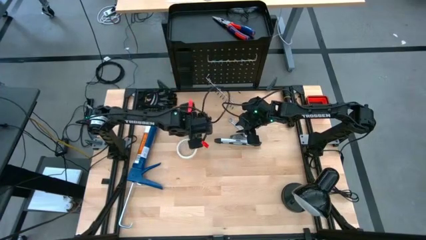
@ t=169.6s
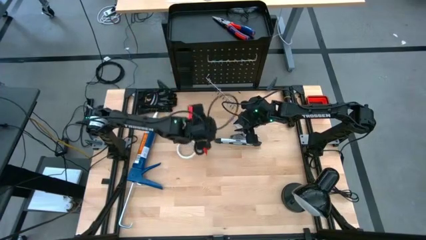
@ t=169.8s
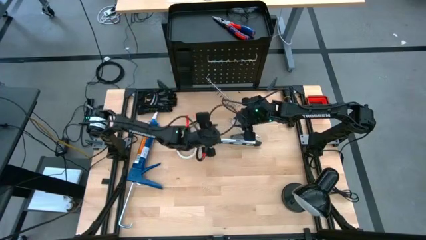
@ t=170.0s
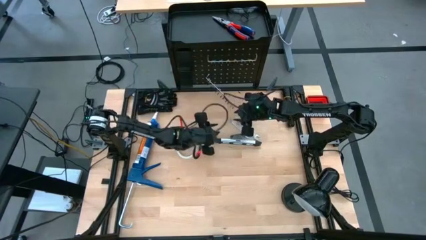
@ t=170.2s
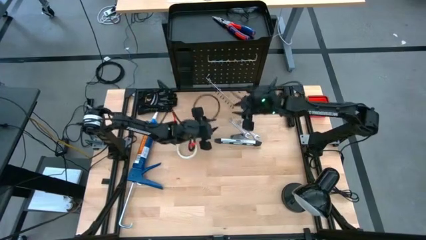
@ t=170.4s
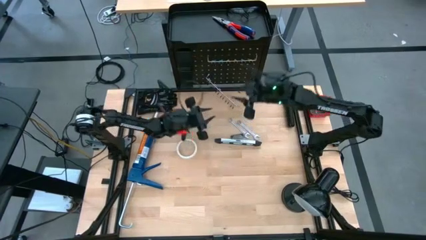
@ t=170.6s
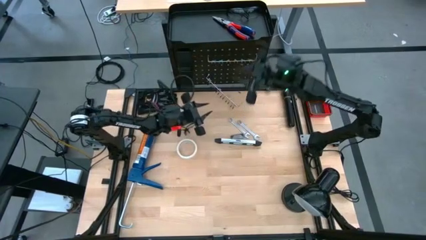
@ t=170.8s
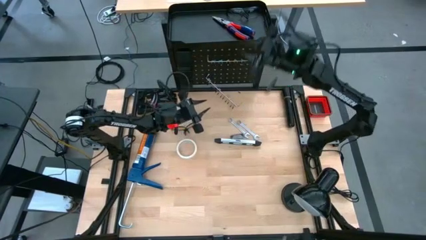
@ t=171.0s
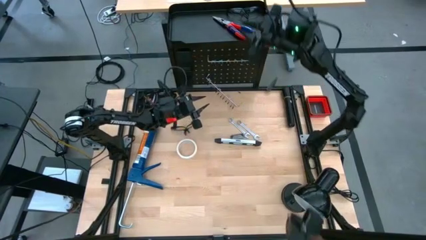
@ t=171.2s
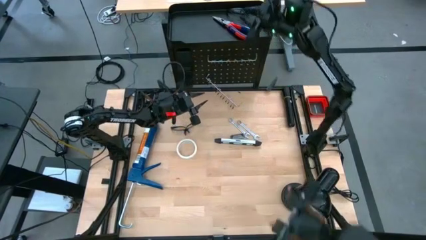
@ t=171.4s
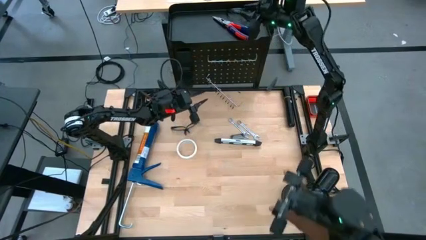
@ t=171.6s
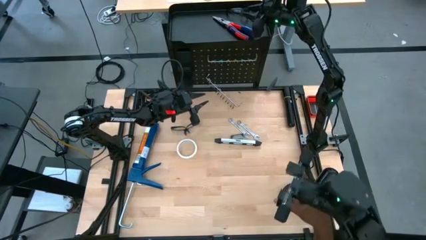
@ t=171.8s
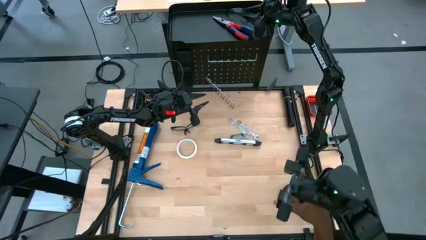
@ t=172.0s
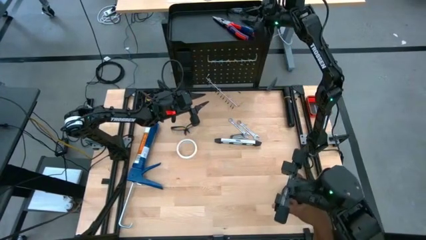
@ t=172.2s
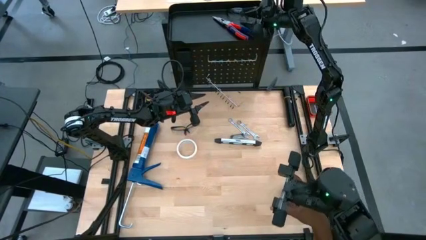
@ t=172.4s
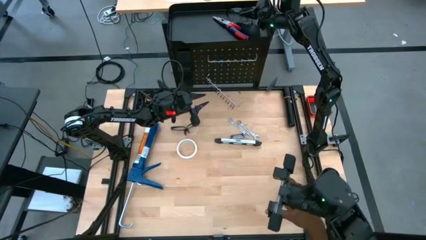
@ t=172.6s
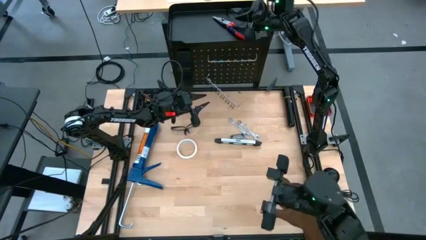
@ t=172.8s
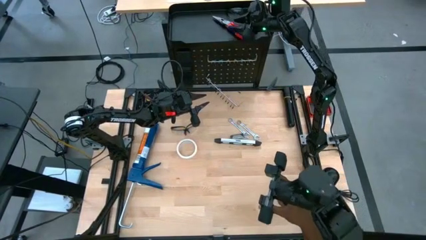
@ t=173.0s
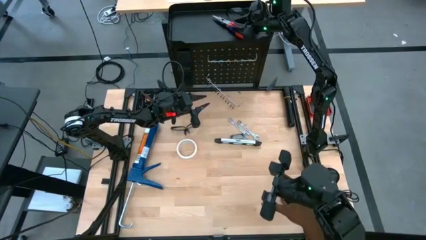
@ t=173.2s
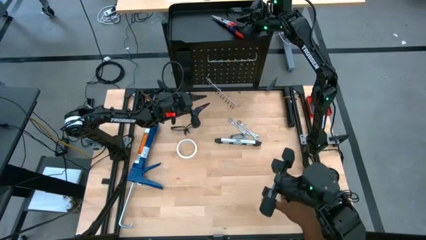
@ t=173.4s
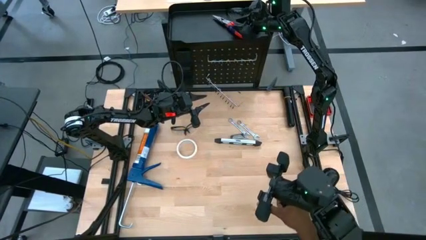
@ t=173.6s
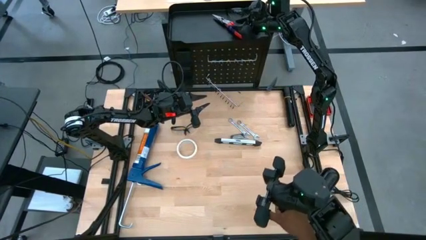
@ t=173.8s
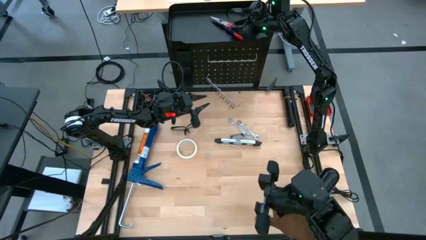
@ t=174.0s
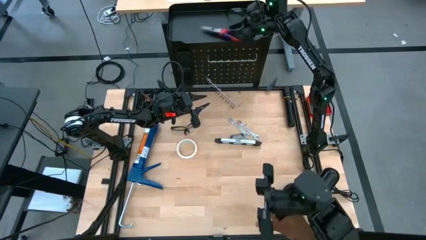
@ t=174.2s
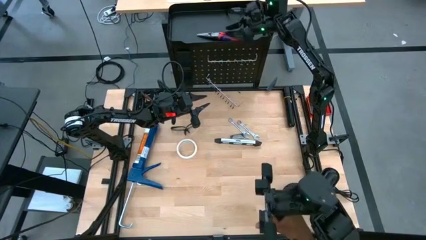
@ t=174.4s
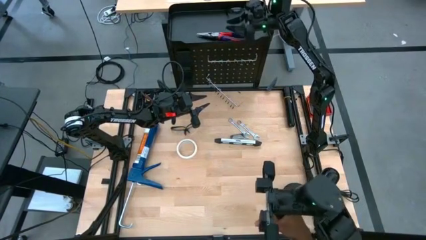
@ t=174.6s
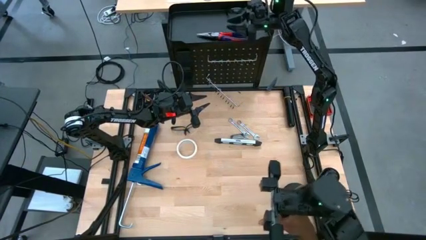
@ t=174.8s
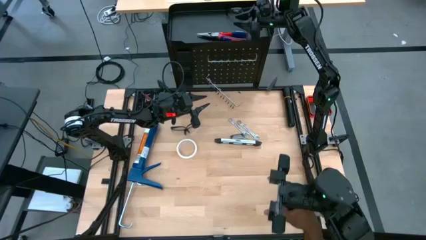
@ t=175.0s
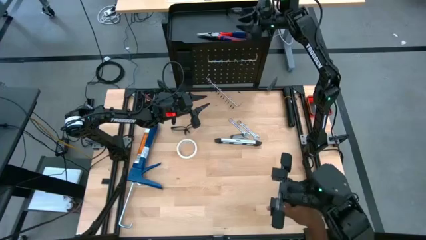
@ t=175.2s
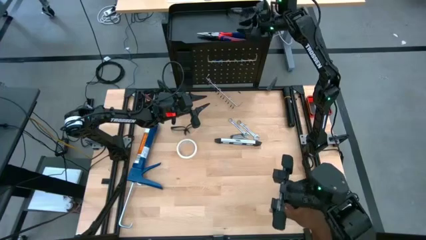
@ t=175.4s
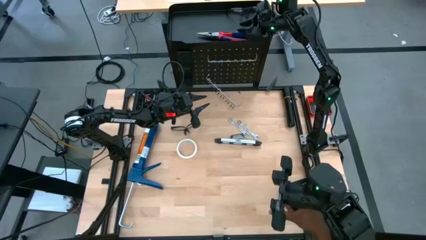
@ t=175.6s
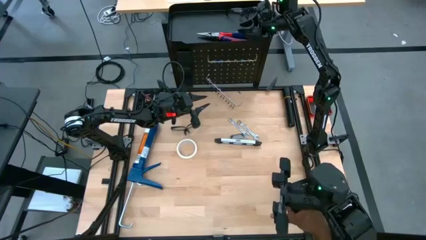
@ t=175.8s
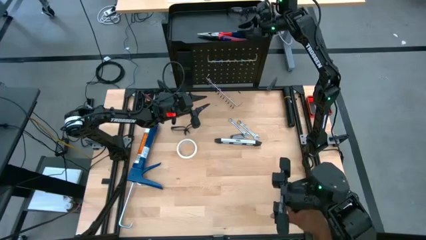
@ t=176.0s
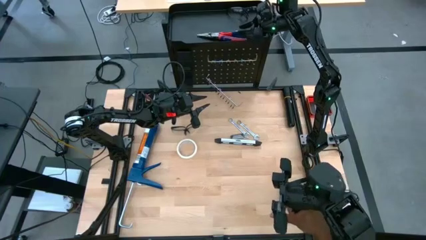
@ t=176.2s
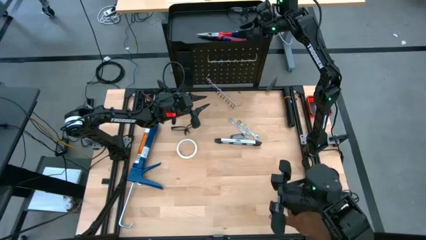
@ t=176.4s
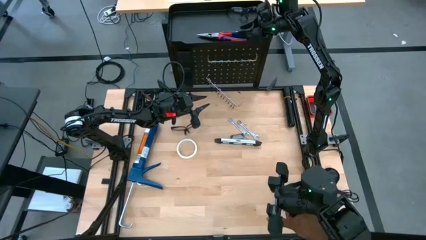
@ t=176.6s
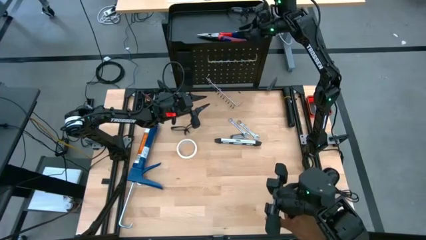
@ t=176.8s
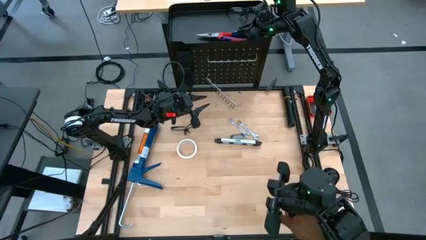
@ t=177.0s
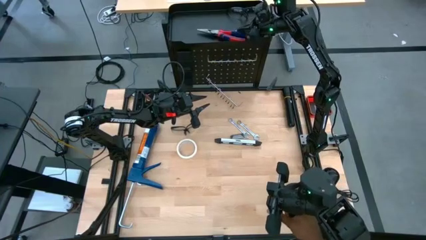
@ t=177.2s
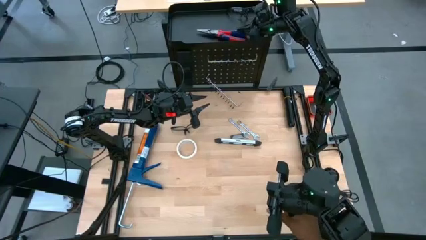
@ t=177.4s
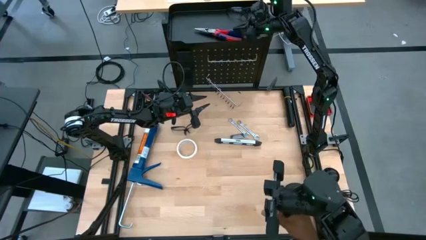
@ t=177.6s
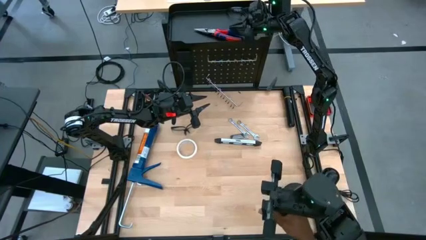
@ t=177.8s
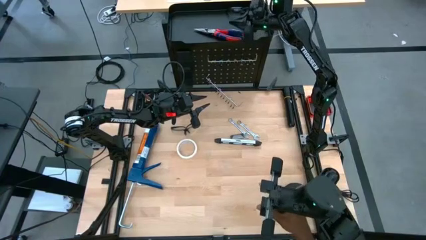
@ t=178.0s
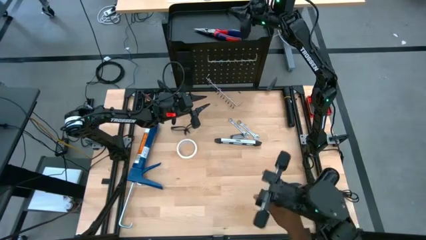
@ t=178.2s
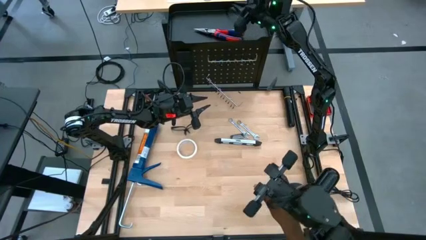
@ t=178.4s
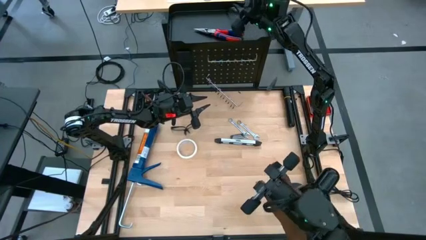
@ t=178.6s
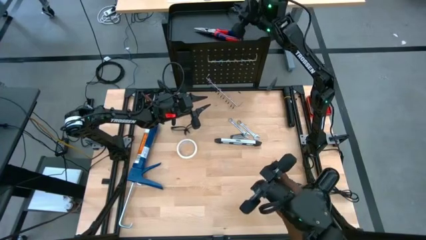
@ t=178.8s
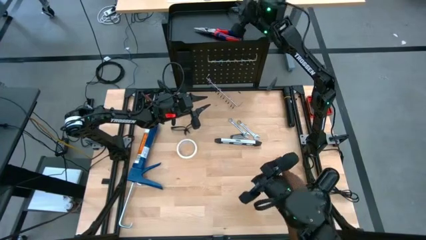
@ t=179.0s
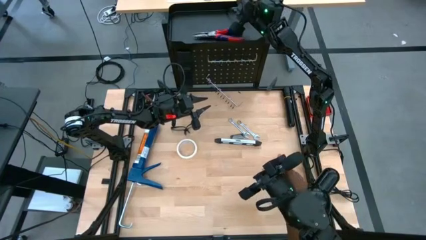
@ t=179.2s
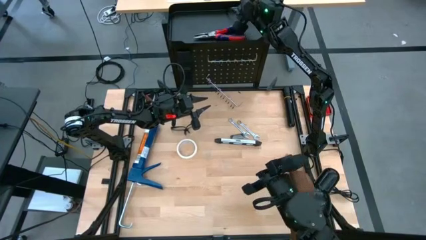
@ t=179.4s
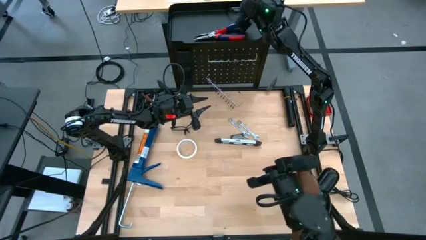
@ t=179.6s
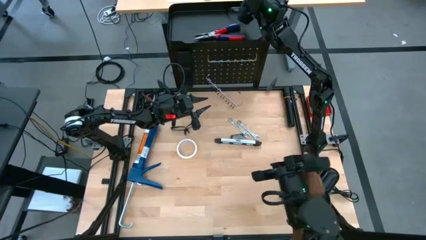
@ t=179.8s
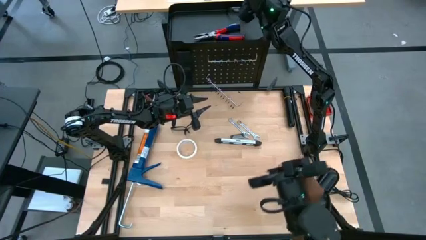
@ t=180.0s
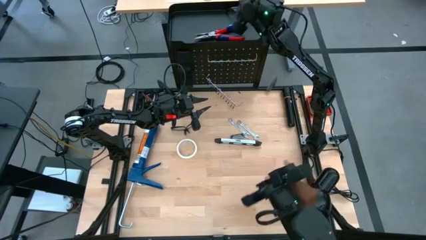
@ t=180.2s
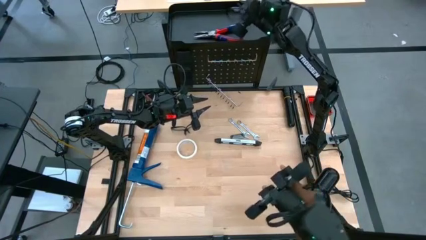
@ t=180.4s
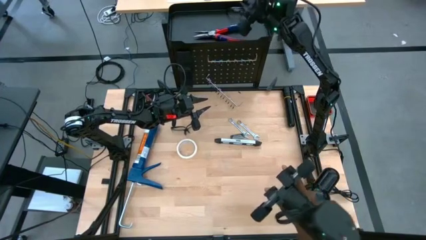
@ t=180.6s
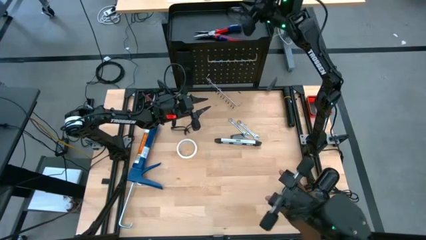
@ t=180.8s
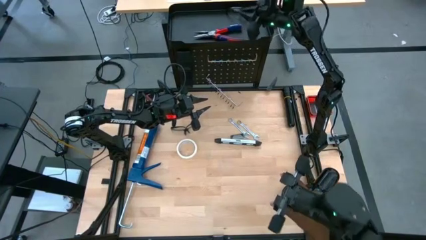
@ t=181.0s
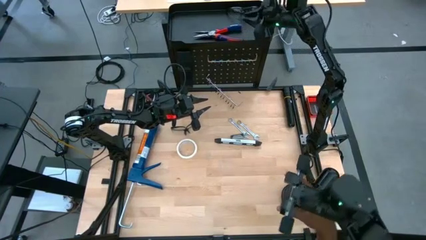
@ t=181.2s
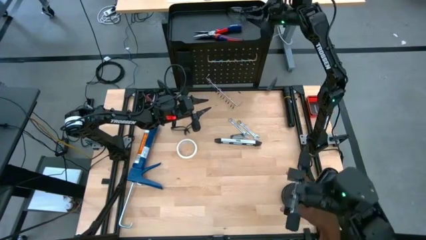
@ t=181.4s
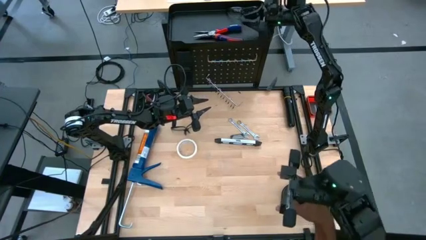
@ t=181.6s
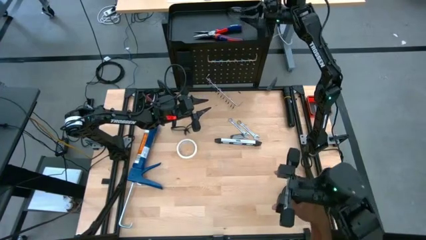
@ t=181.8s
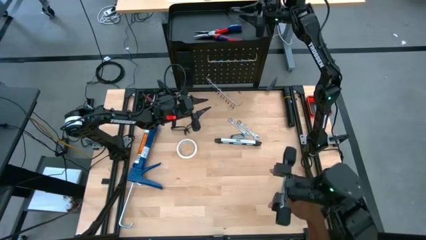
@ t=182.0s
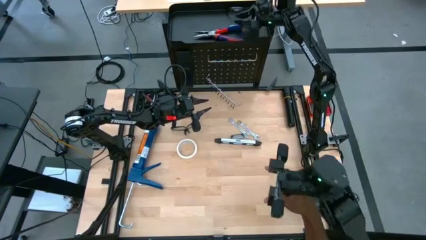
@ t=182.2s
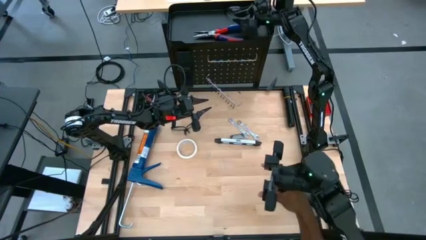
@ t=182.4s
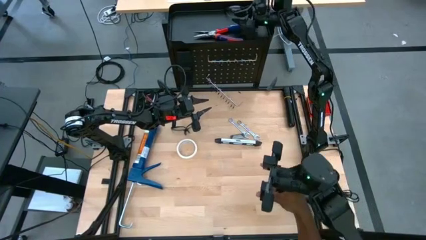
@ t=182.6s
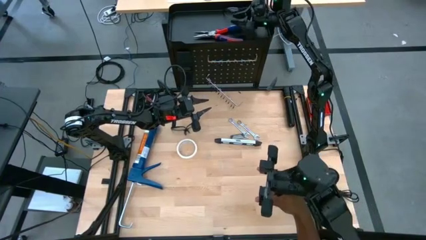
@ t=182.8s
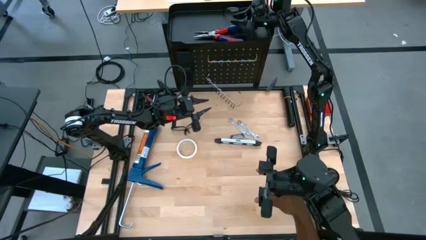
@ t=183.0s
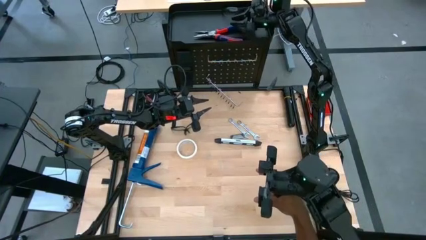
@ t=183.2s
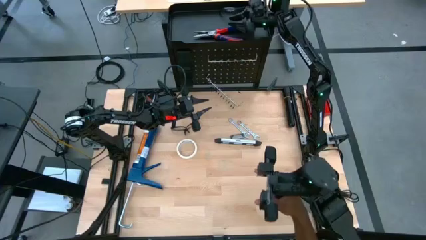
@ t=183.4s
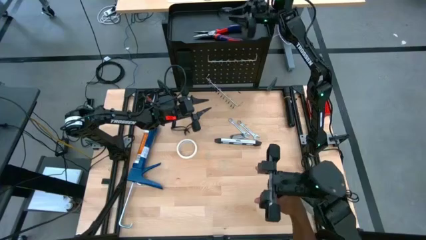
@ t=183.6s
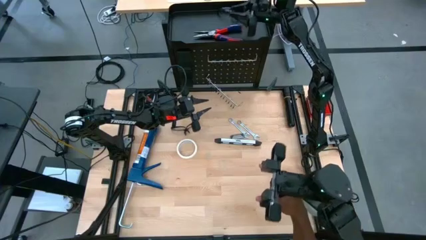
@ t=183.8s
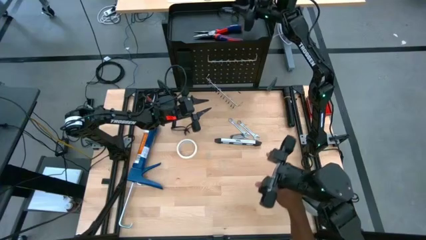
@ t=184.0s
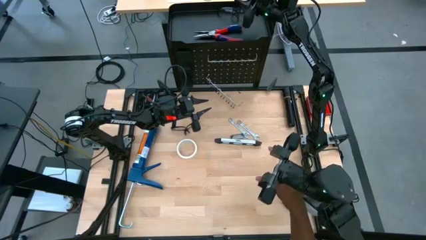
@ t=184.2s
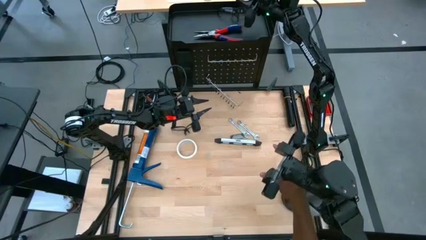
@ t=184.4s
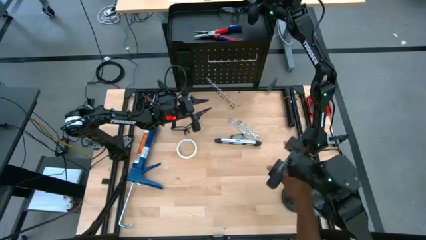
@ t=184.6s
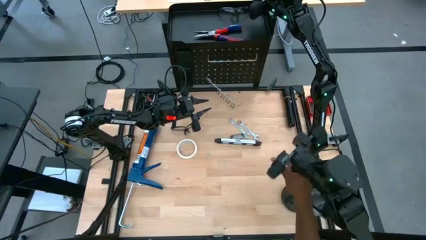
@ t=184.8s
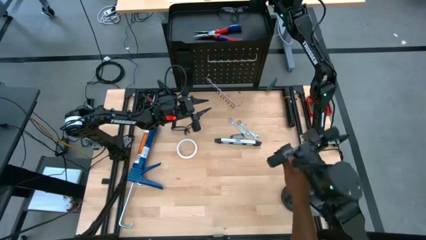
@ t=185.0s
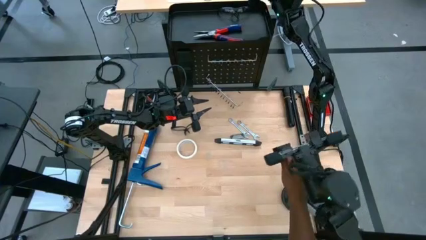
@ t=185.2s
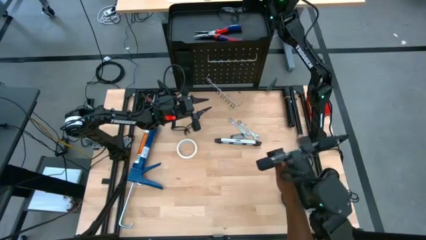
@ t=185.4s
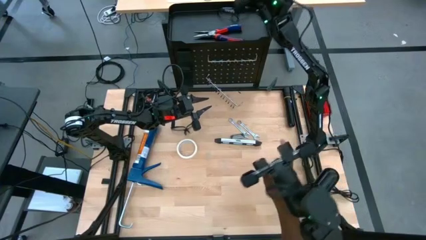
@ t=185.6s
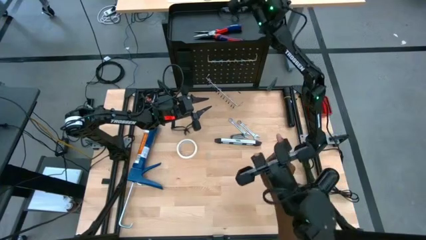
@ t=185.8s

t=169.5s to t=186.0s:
Task: Hang tools onto peg board
Remove the pliers from the peg board bin
